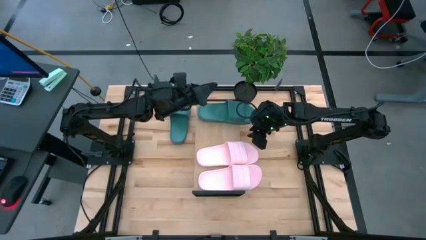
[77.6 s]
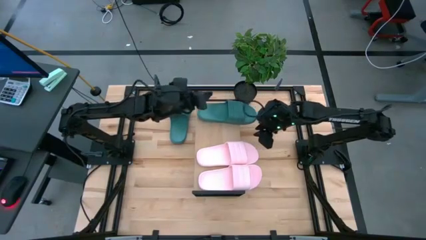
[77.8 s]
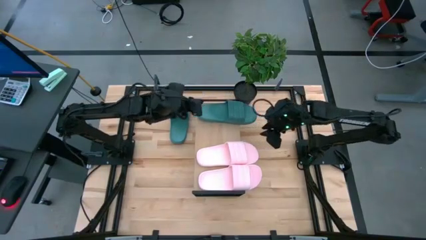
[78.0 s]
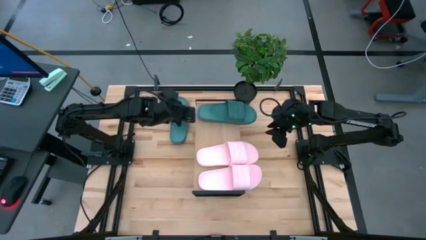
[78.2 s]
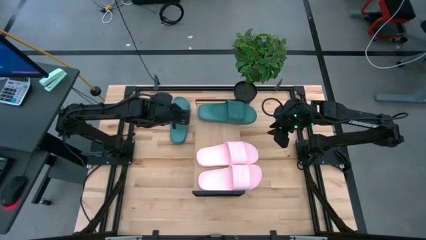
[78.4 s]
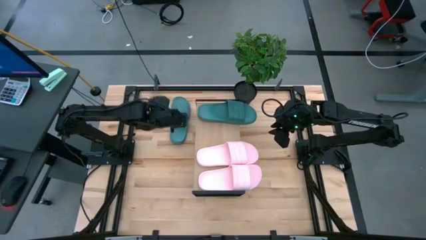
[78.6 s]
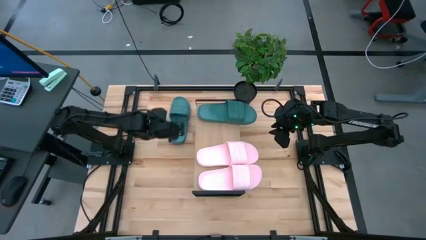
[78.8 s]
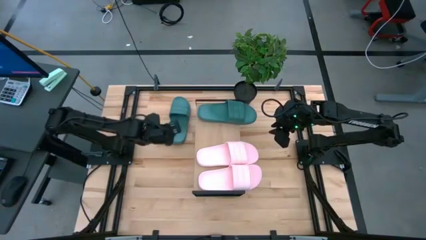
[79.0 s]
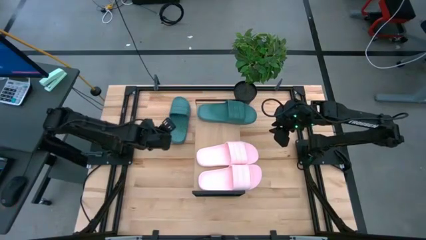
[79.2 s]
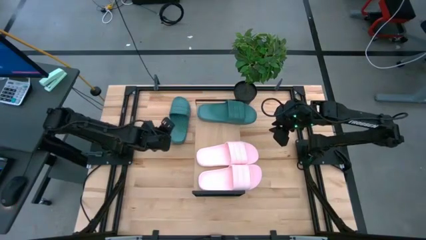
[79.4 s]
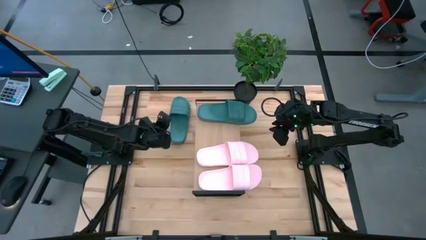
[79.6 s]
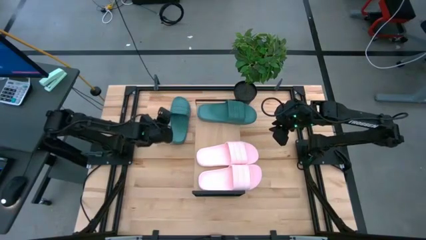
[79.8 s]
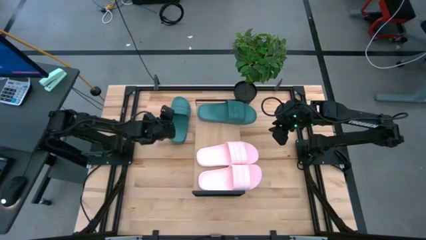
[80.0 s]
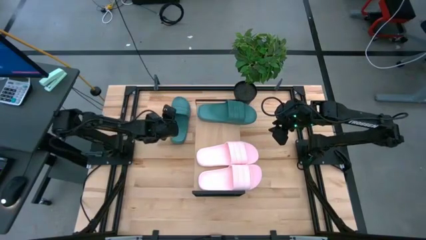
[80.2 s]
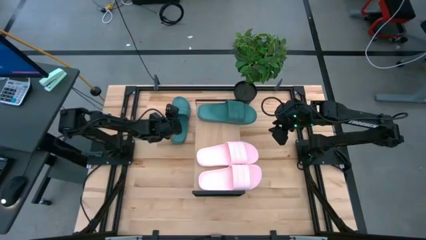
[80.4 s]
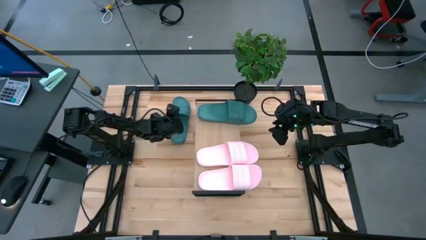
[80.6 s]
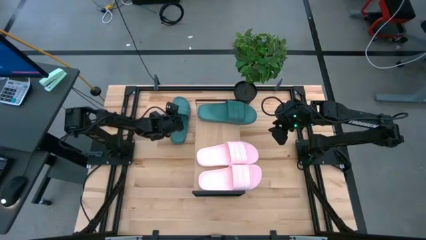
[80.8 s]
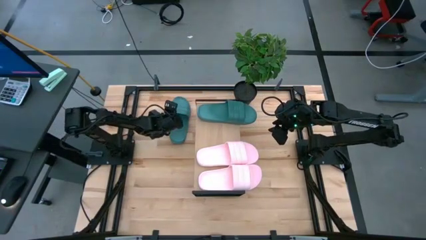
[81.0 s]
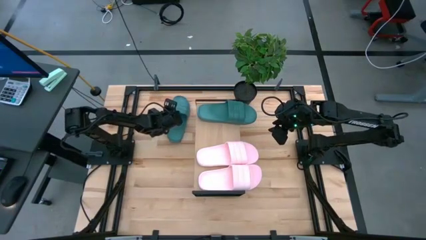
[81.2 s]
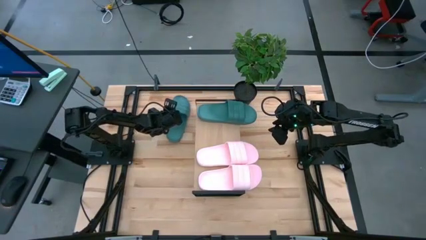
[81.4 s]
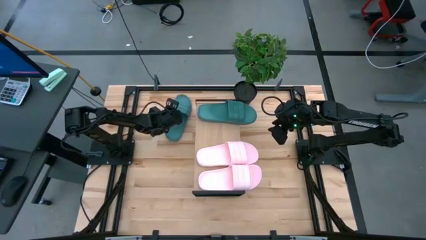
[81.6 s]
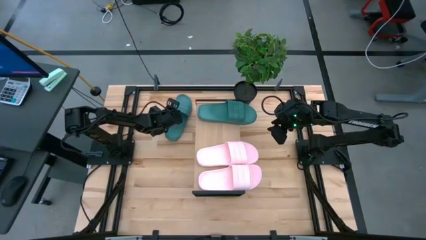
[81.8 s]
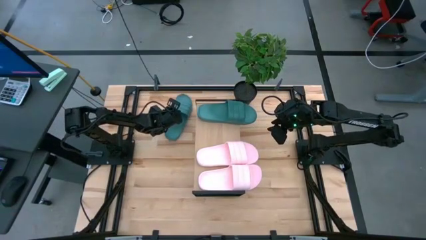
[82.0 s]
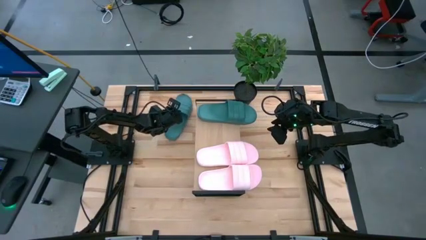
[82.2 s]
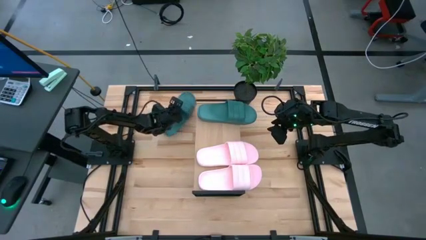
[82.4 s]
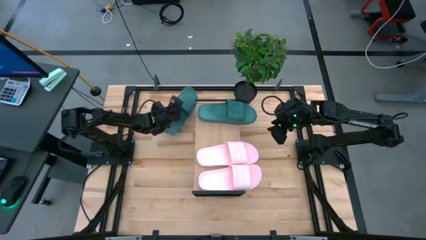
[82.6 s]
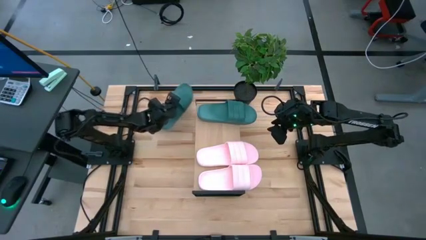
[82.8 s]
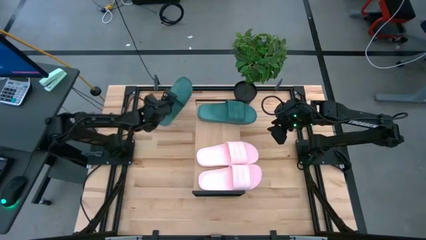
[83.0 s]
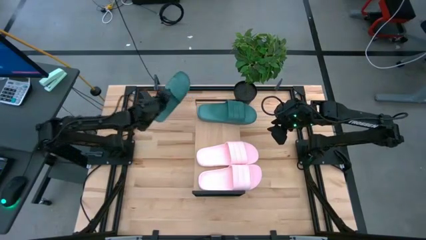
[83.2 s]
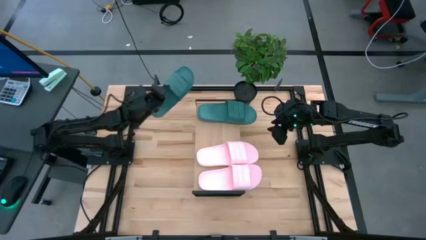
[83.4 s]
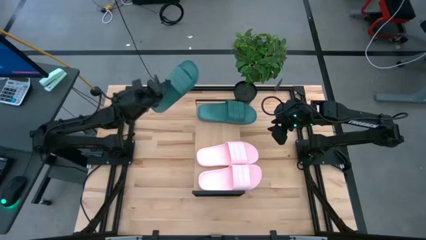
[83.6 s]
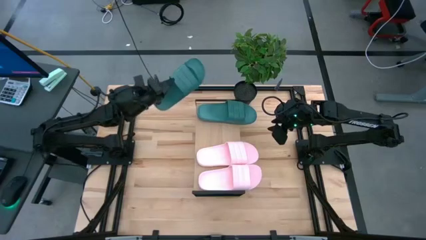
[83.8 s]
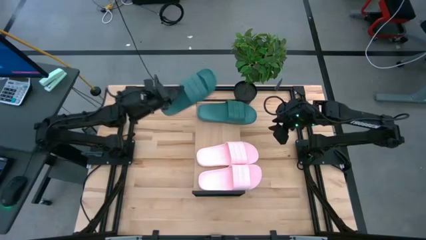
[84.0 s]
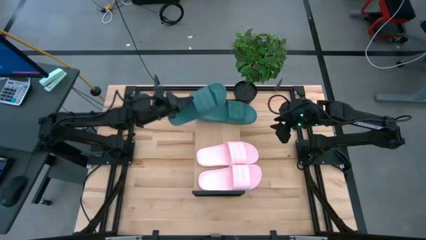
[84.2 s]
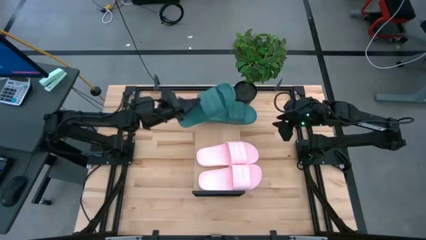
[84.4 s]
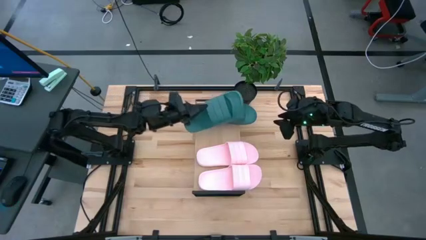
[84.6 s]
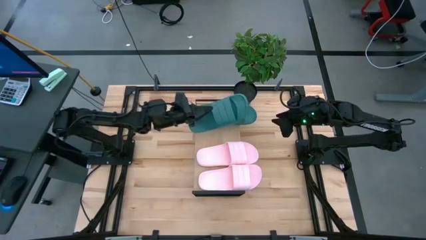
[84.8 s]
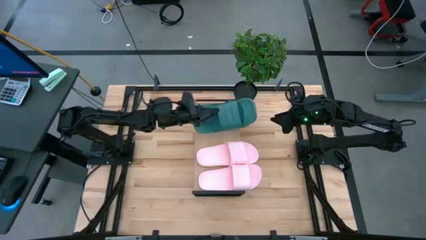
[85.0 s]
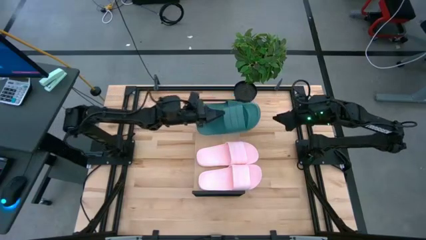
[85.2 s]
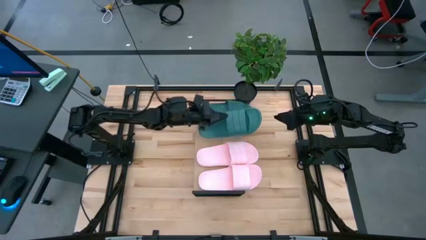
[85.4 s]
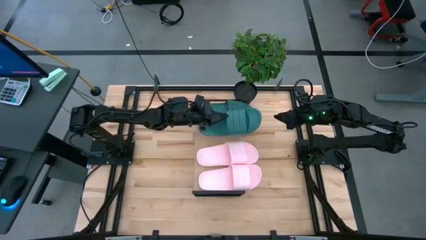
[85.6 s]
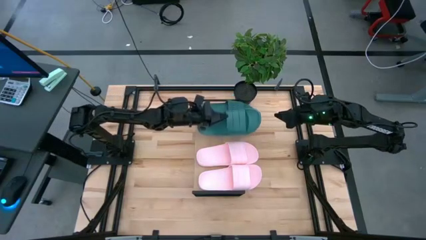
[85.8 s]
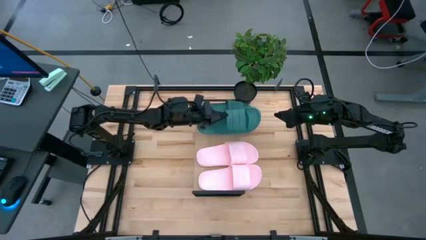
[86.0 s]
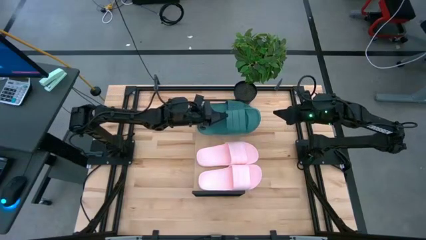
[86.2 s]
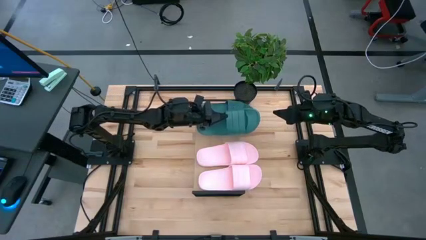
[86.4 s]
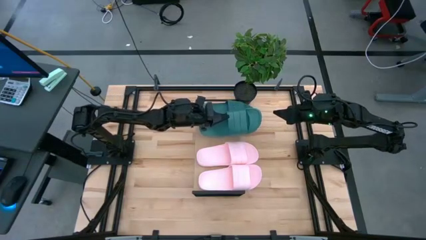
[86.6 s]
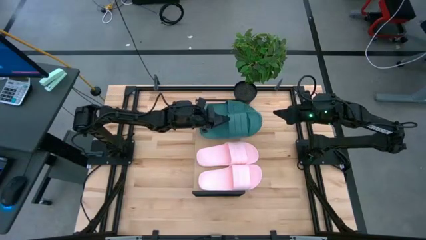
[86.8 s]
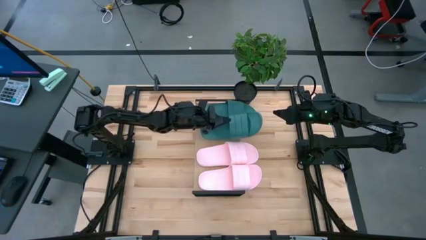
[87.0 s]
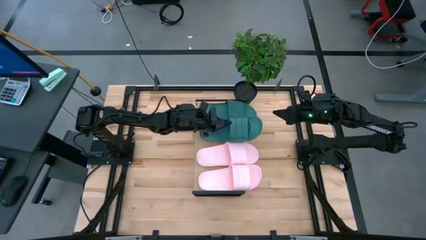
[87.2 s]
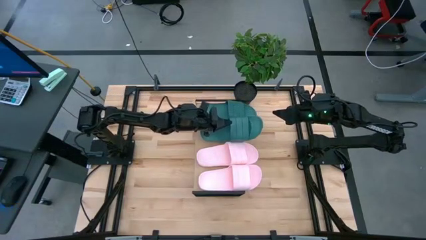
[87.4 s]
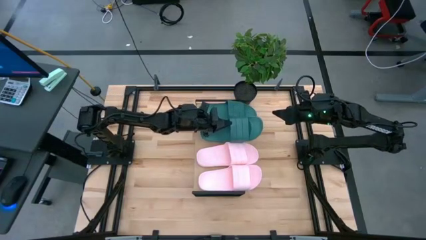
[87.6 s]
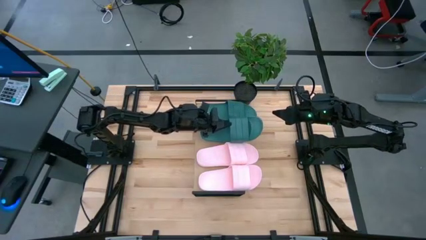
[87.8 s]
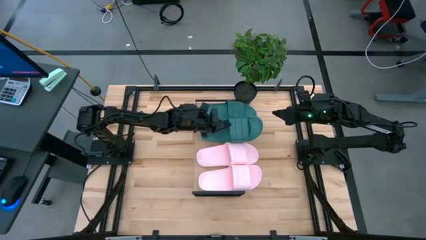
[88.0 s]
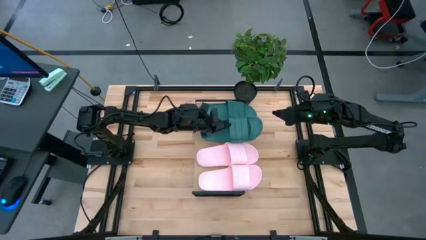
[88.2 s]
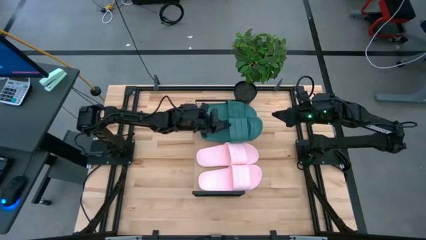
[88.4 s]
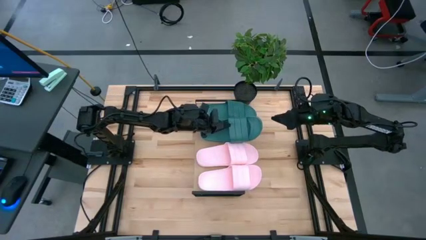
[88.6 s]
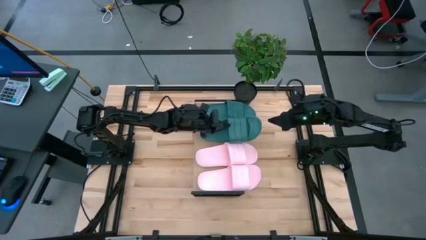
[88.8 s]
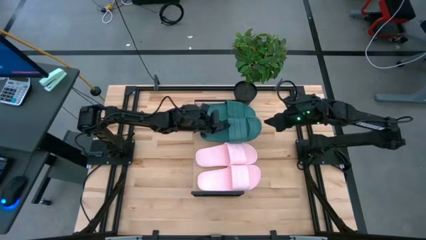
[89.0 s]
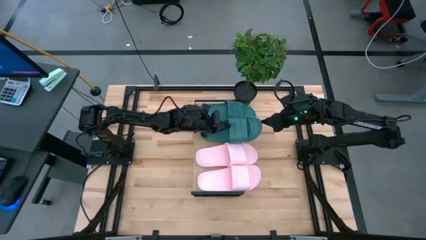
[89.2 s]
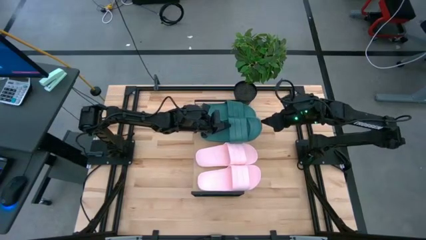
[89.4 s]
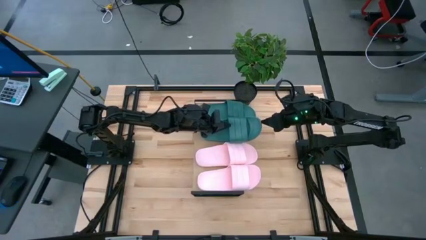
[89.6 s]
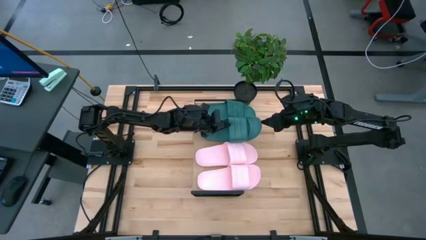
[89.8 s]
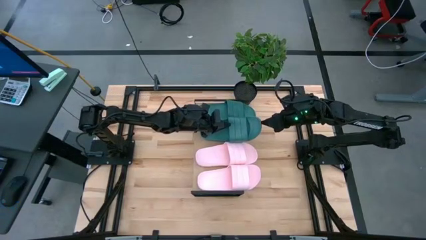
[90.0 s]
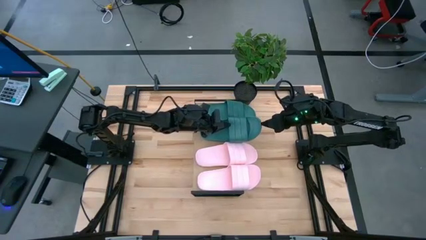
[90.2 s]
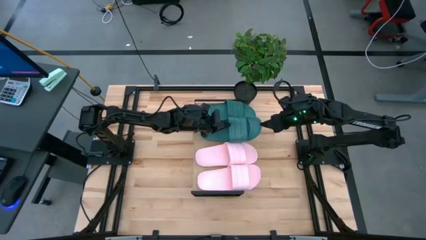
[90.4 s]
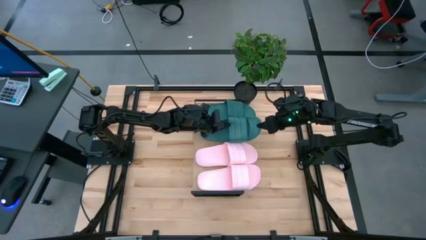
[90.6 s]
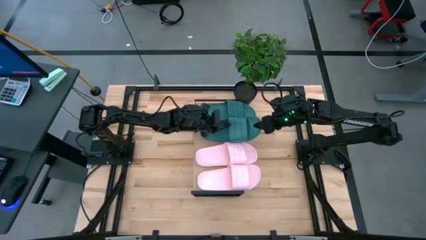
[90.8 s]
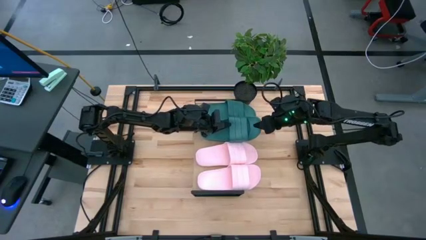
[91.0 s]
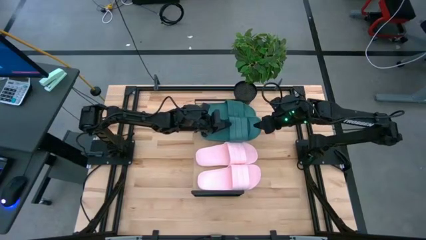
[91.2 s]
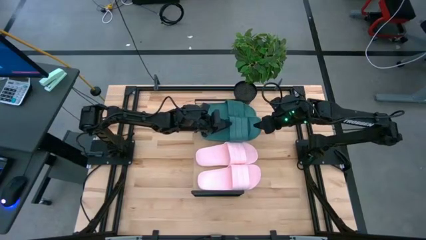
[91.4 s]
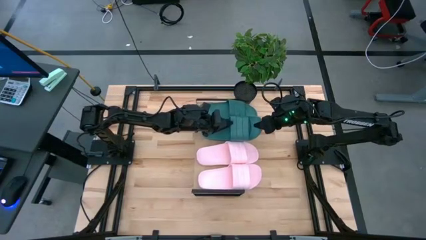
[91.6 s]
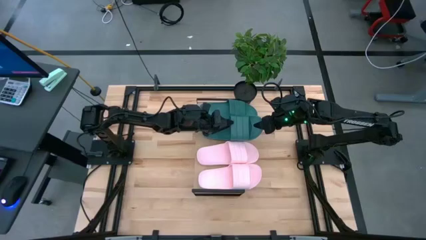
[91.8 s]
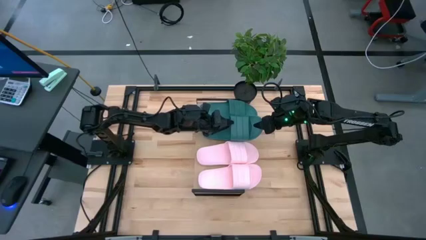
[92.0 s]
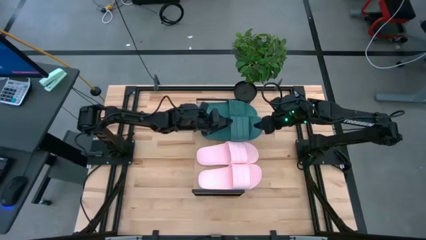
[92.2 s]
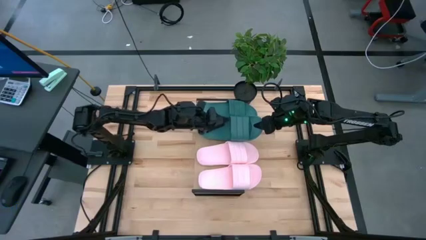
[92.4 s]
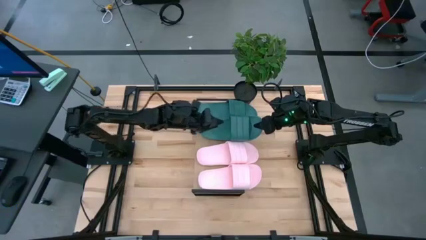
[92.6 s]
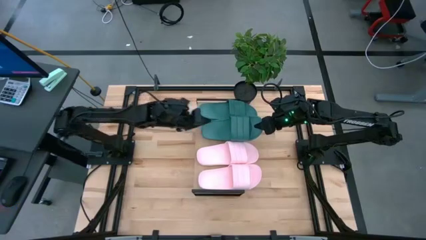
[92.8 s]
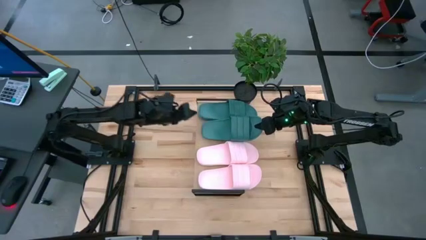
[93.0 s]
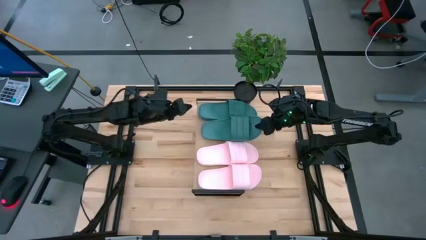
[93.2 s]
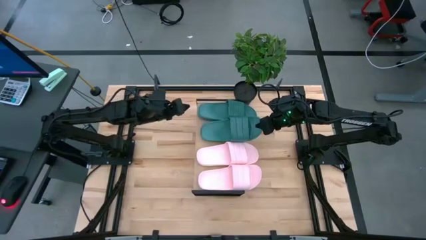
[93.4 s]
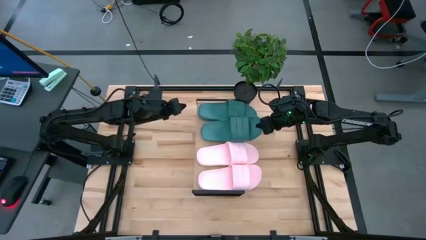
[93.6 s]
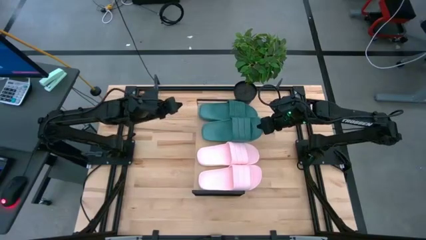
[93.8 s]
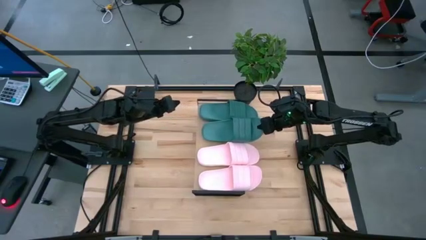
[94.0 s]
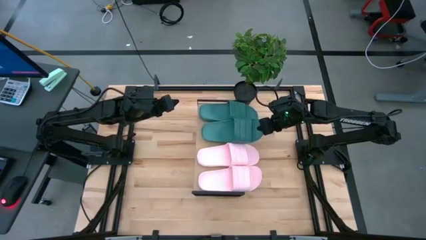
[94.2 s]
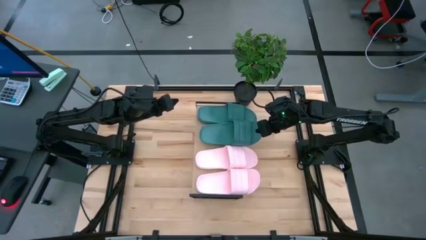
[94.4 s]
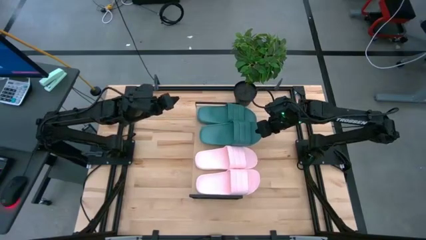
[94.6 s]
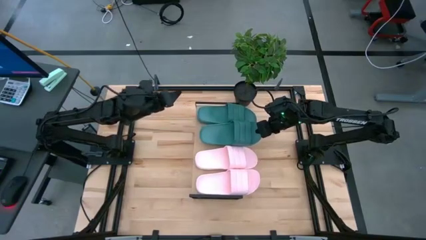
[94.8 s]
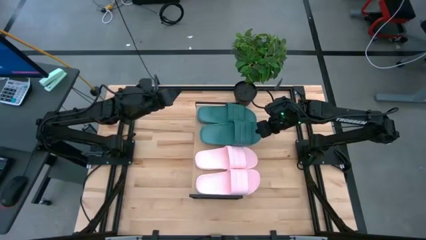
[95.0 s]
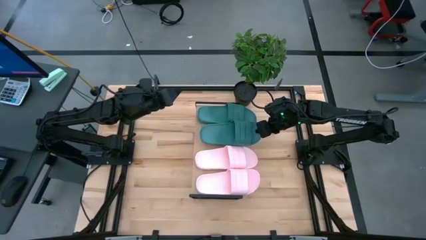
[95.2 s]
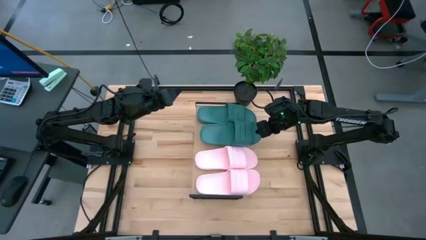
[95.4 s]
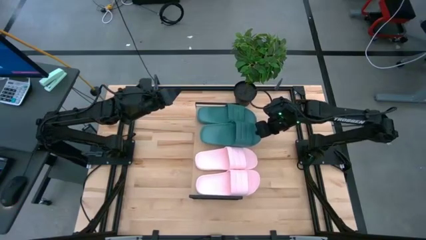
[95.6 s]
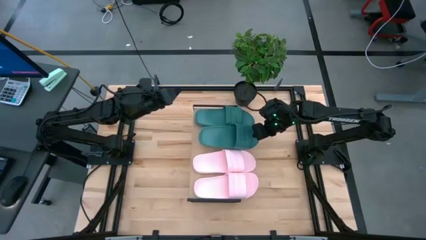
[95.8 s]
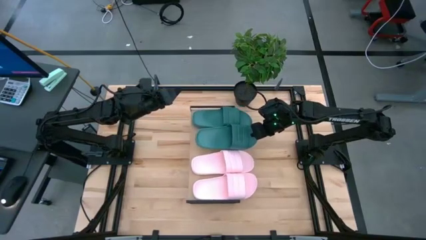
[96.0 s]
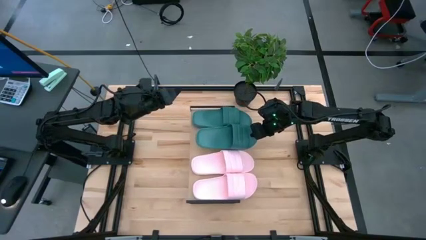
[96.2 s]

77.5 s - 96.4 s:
Task: Pick and place slides into the shelf
Put the green slide on the shelf
